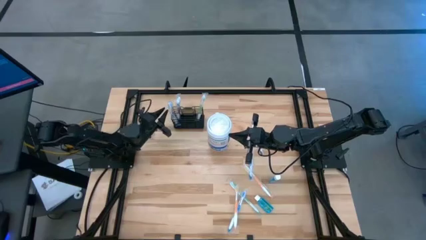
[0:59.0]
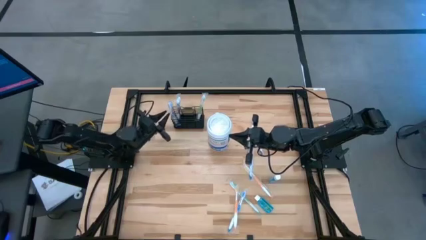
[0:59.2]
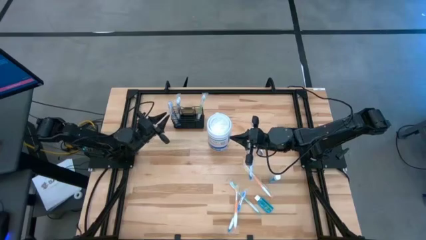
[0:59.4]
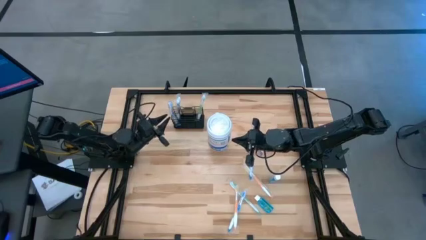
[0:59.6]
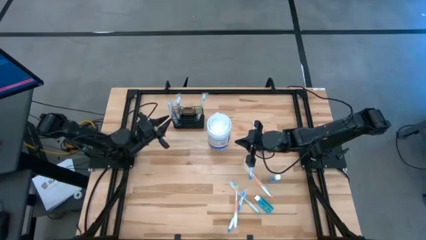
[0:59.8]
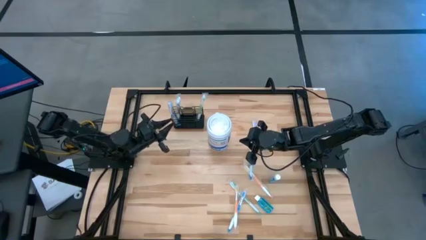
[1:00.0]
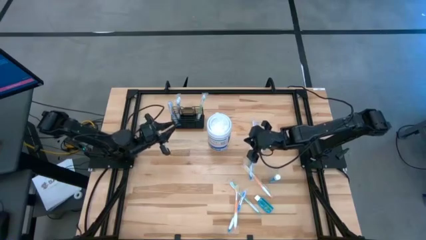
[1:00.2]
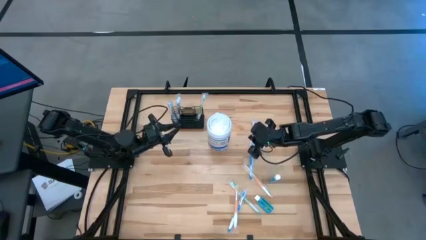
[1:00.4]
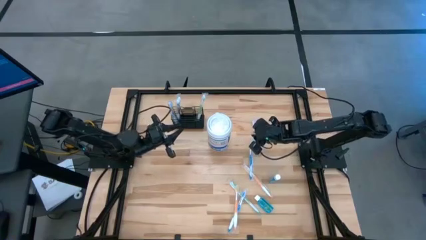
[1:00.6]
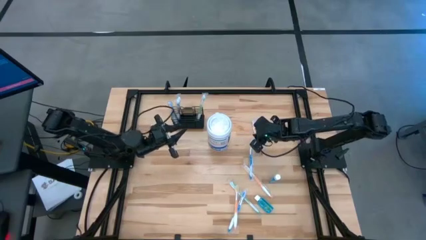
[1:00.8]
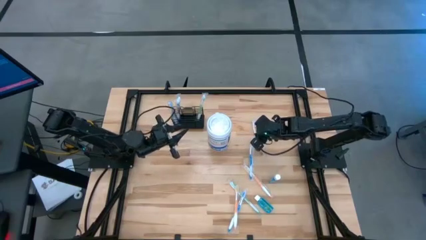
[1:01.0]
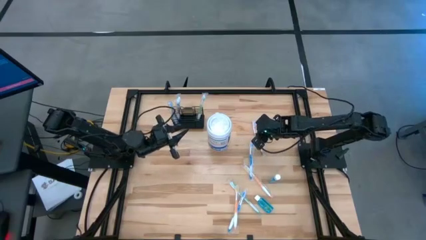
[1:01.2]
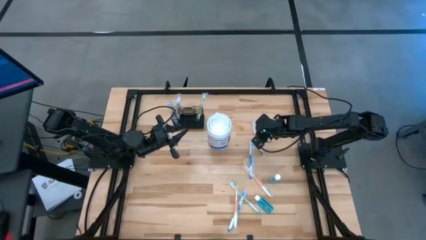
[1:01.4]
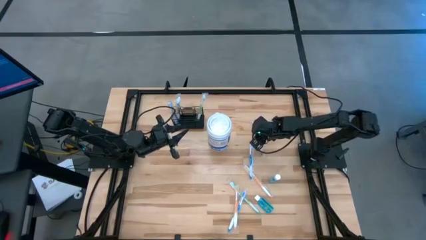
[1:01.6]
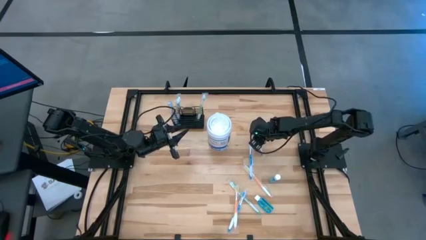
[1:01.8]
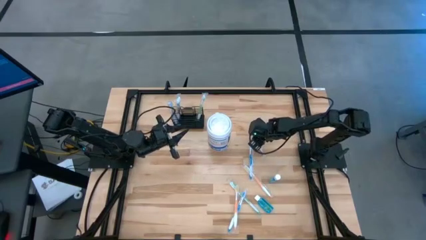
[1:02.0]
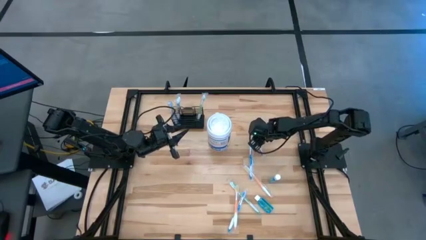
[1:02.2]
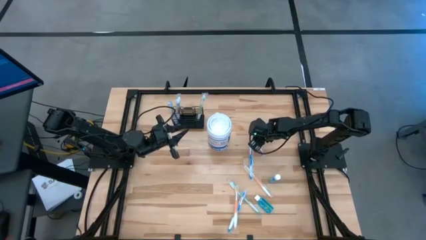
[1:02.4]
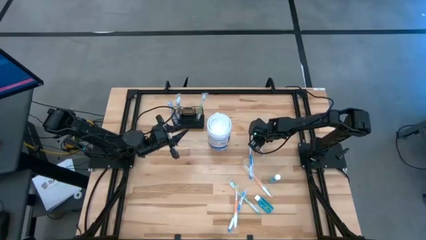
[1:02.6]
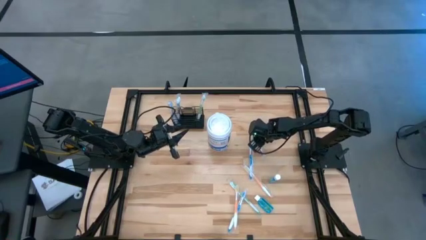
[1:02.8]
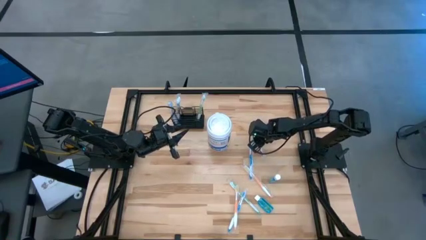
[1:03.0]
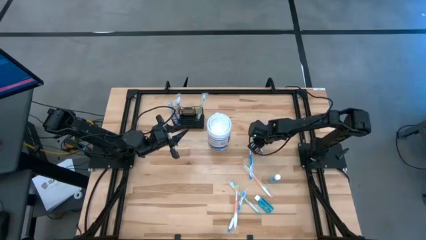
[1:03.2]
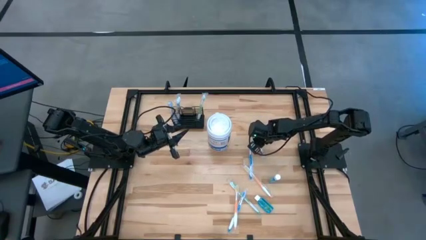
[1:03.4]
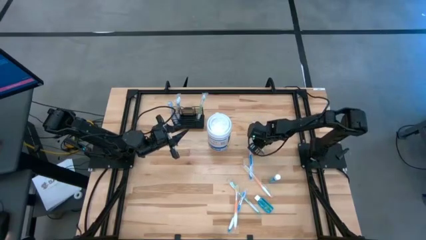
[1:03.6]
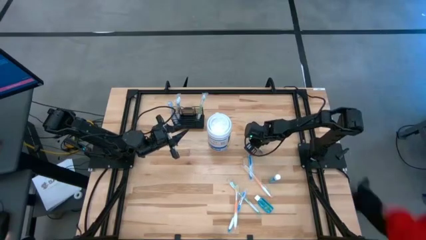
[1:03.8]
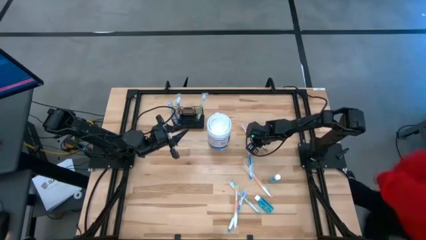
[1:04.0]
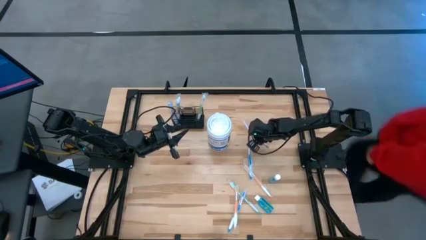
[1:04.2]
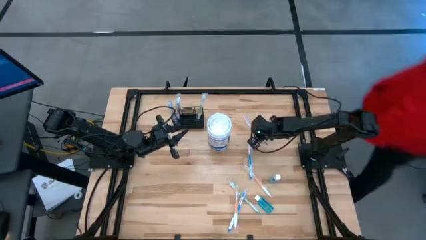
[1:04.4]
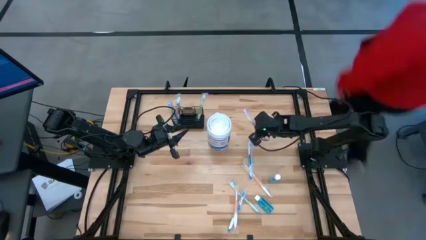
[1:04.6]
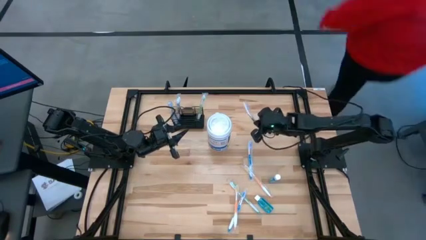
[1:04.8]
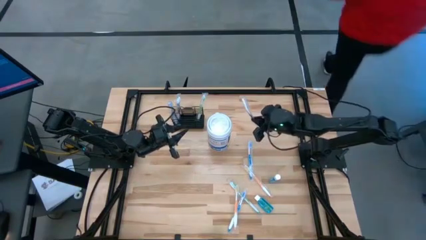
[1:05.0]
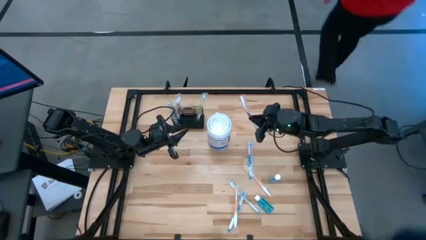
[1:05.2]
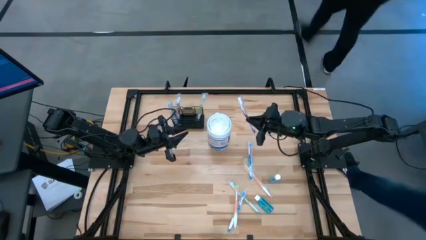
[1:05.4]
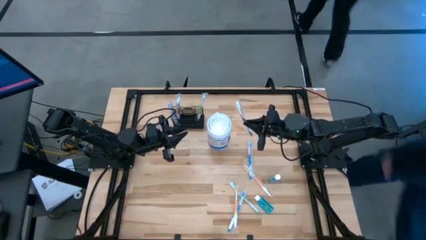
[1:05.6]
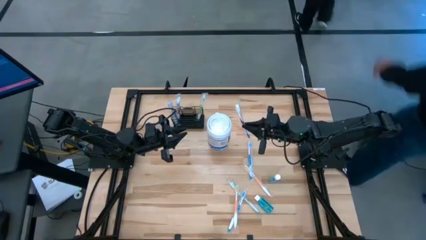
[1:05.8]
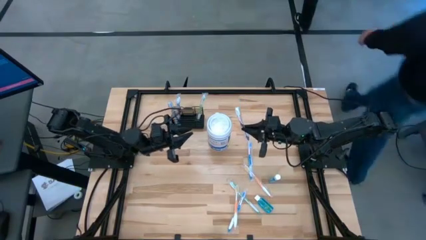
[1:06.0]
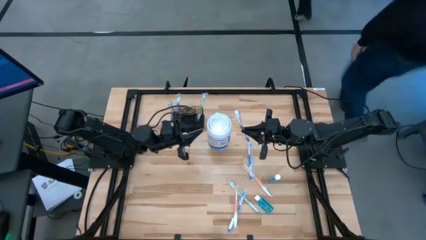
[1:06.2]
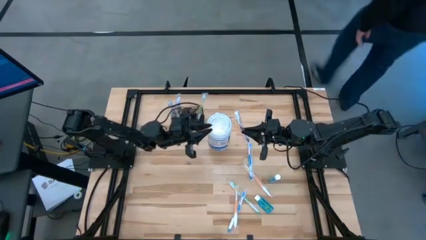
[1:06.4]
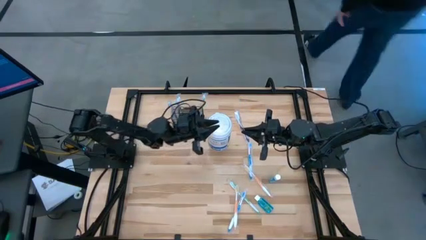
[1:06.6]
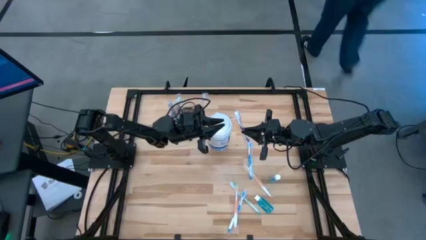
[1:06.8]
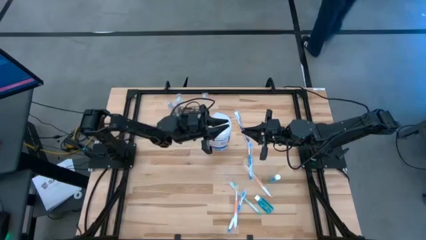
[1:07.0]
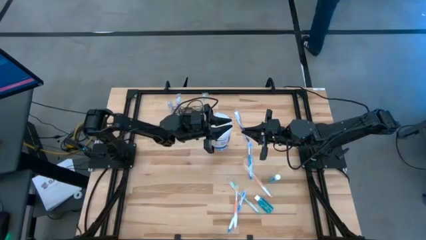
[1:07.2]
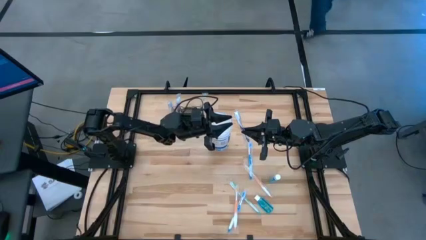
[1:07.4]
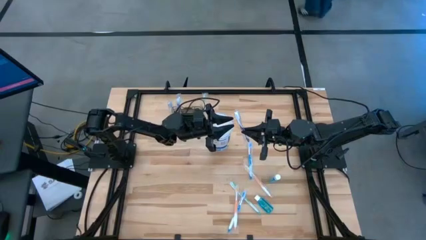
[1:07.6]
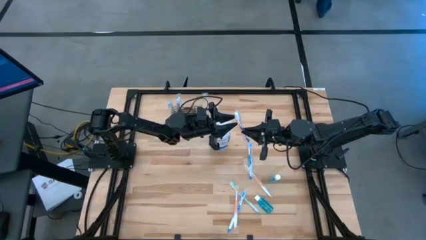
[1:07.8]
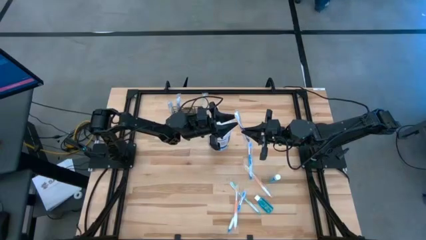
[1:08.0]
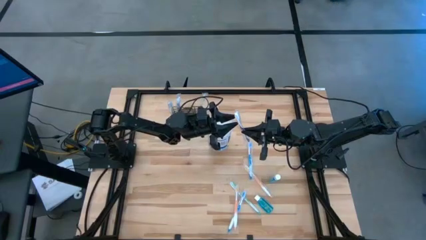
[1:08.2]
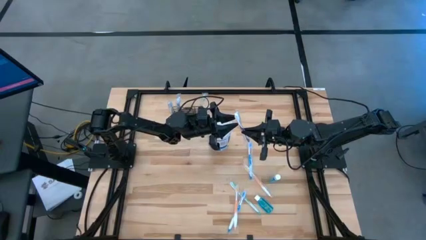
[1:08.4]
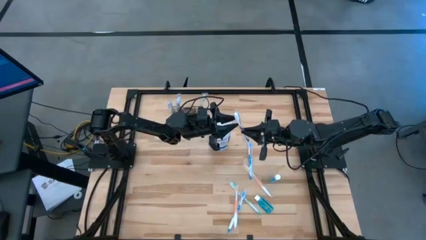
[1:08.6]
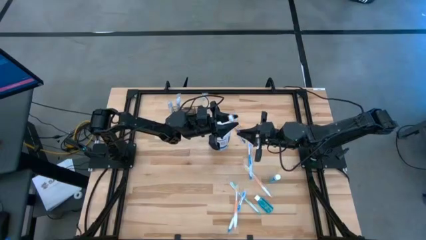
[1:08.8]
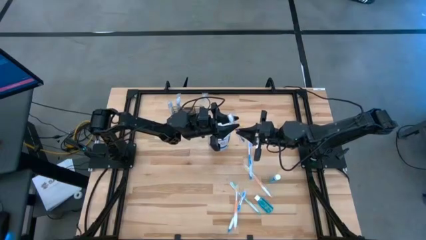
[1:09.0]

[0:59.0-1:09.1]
Task: Pick & Place toothbrushing station
Put the purple toothbrush into the mesh organizer

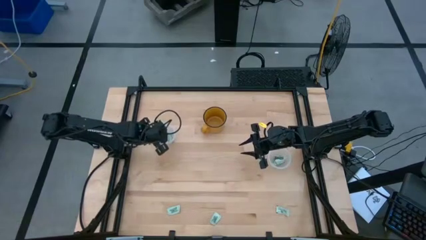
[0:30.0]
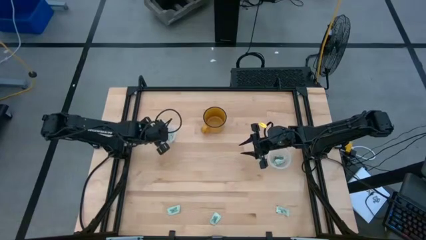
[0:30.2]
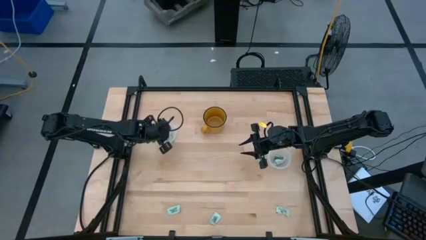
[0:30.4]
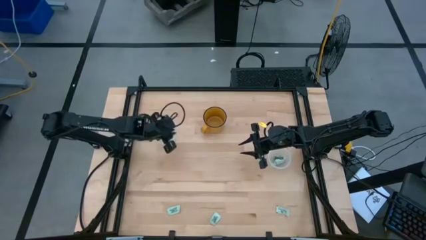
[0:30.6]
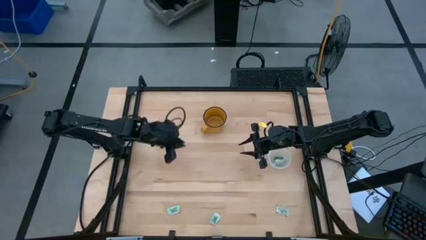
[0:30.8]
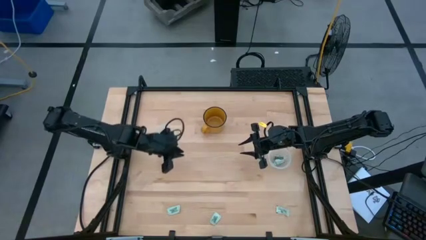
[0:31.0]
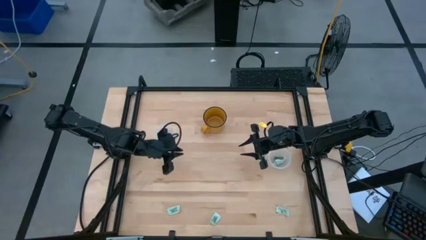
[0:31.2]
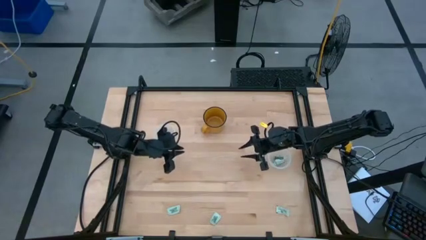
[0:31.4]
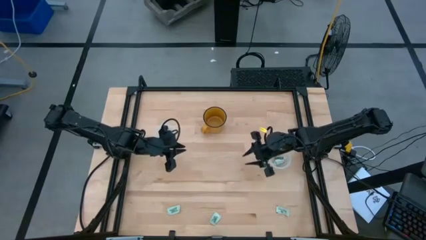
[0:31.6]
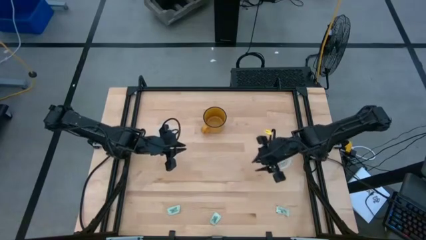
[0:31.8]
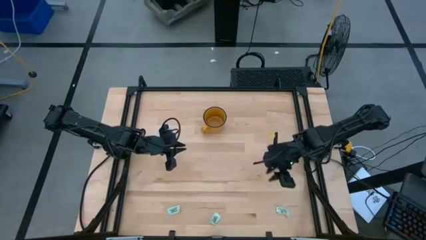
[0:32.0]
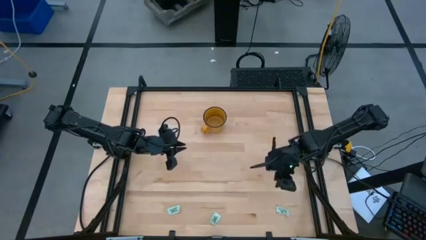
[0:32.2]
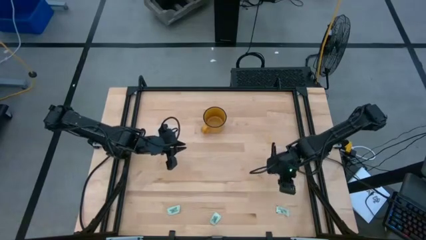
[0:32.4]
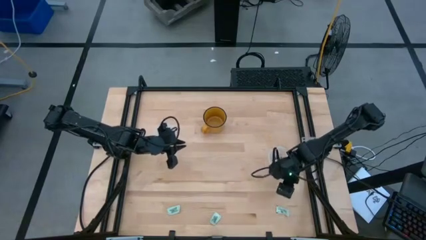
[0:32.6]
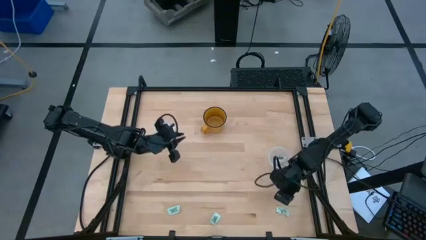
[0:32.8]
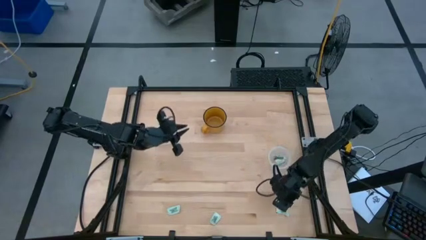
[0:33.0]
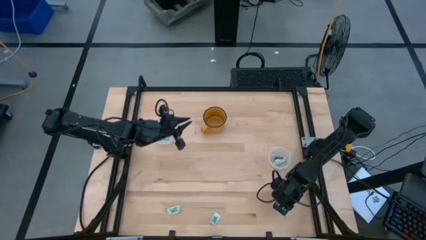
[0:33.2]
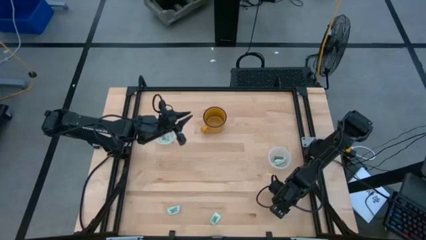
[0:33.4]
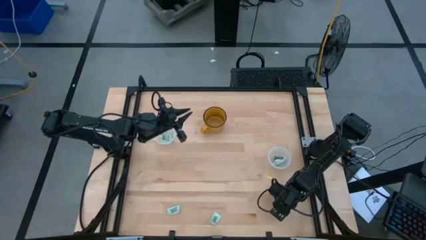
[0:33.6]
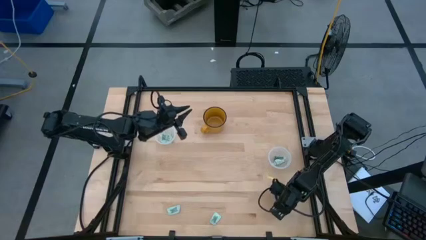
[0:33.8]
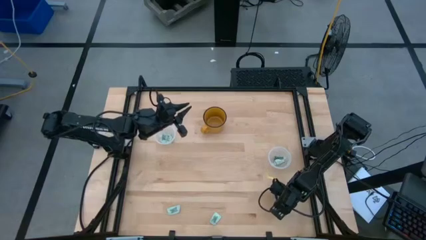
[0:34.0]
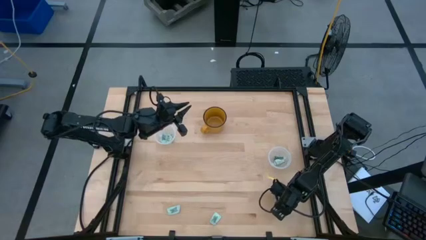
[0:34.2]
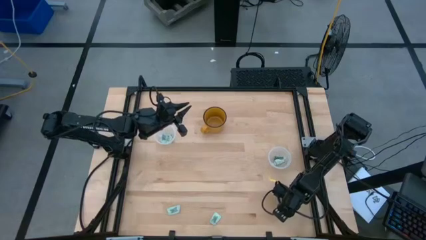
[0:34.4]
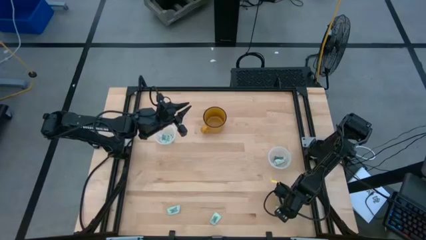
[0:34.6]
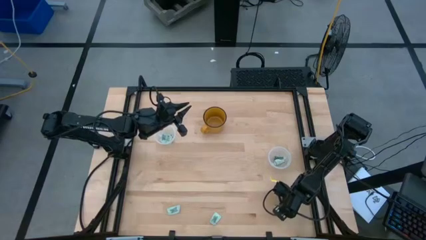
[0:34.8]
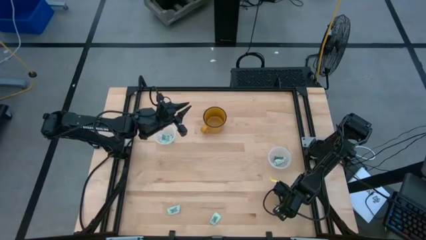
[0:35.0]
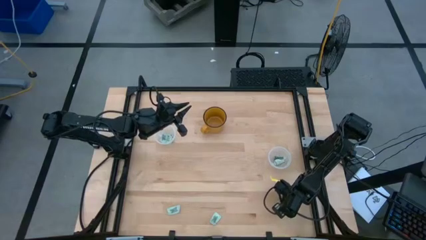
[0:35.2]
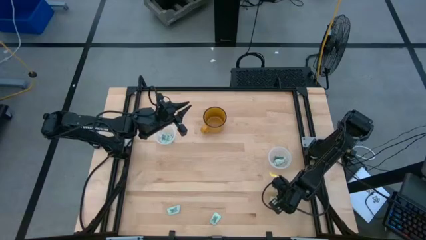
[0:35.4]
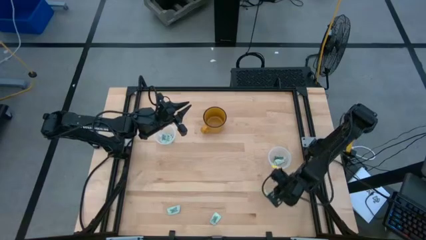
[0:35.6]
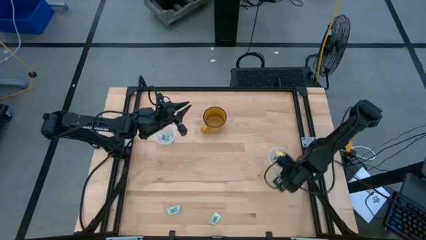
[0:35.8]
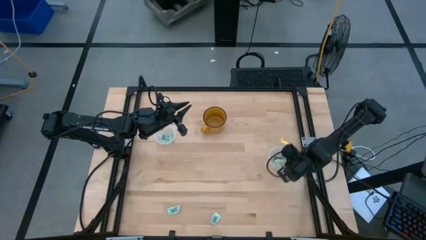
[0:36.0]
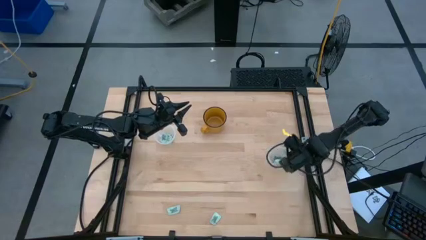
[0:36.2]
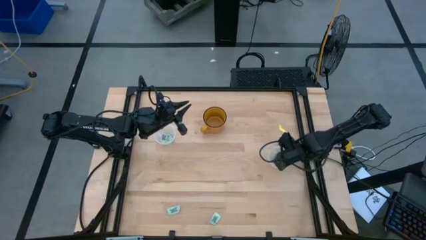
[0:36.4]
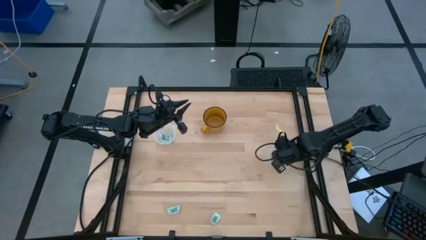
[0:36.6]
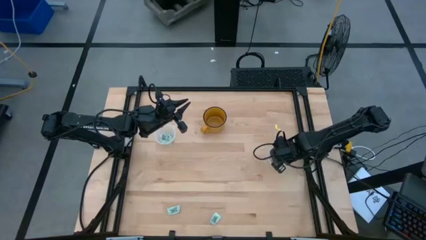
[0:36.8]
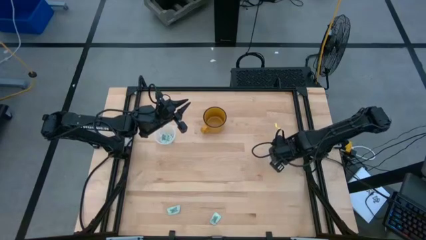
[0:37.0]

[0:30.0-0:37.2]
Task: Pick and place Stevia / Truvia into bins
Put the light green stevia packet into the right transparent container
